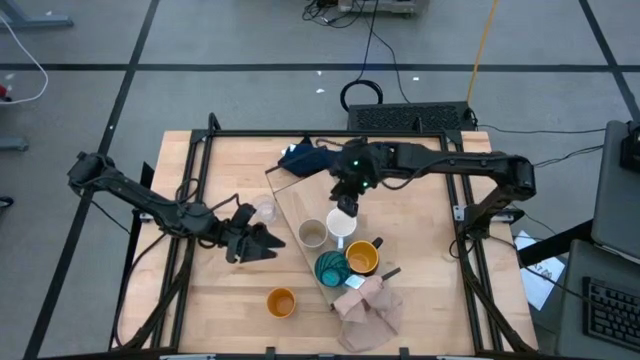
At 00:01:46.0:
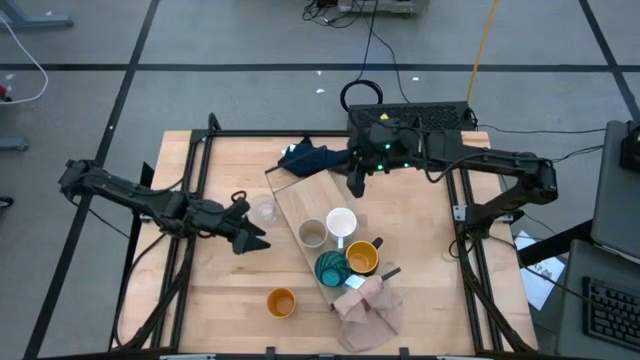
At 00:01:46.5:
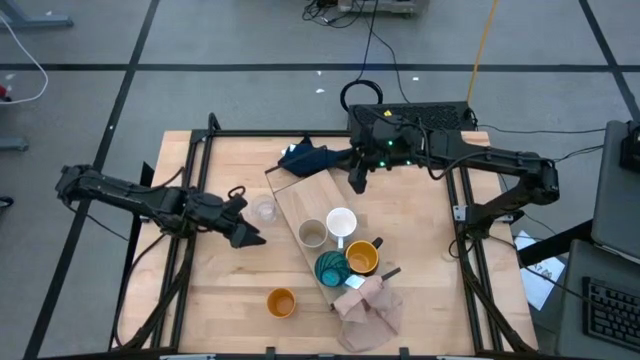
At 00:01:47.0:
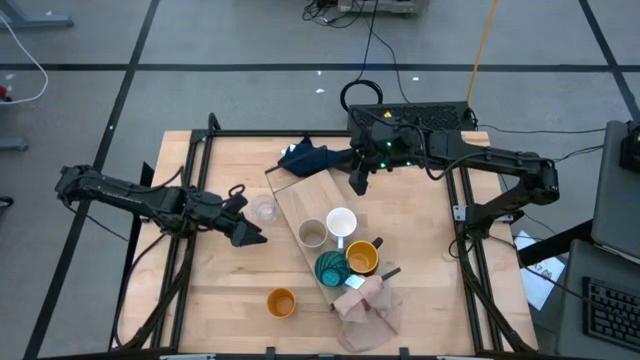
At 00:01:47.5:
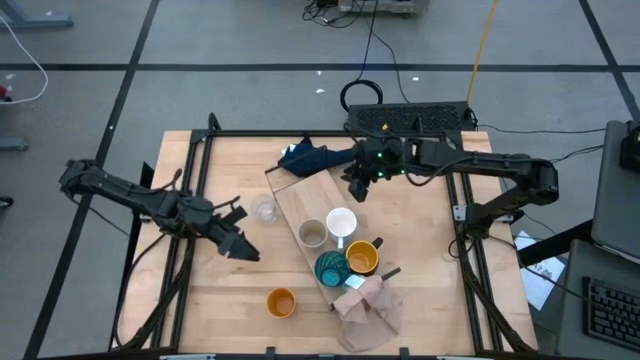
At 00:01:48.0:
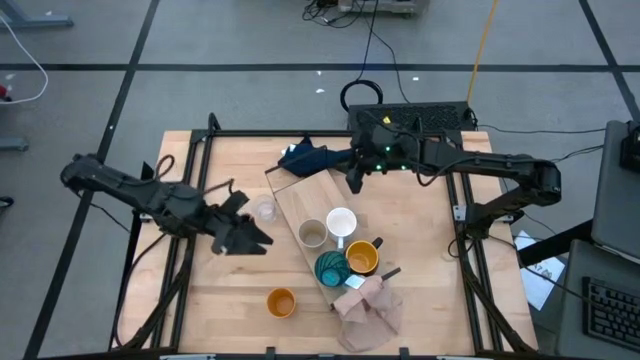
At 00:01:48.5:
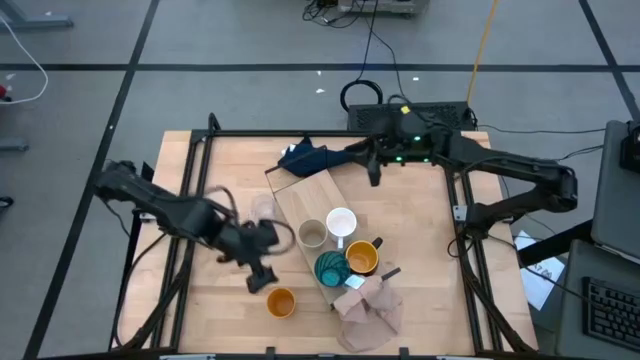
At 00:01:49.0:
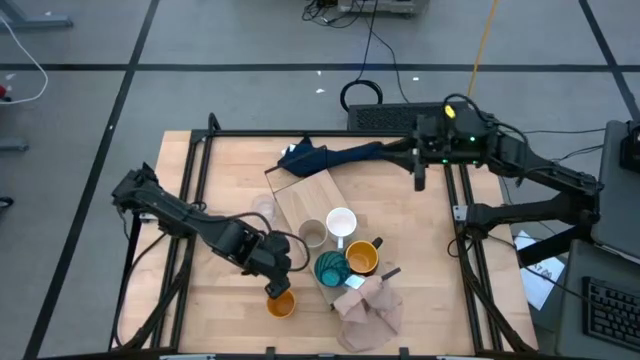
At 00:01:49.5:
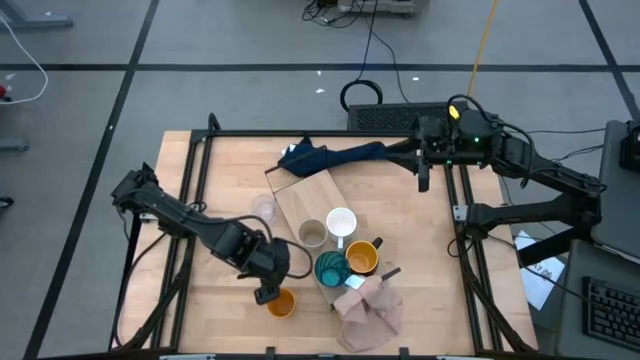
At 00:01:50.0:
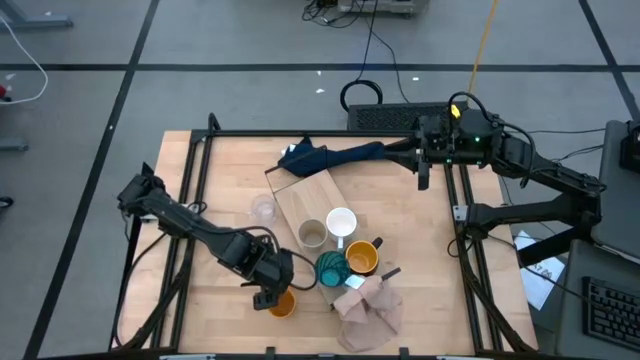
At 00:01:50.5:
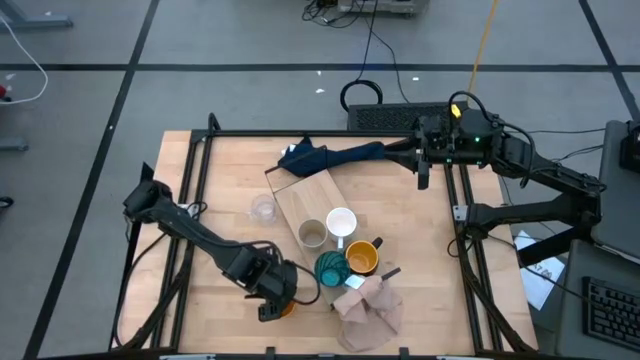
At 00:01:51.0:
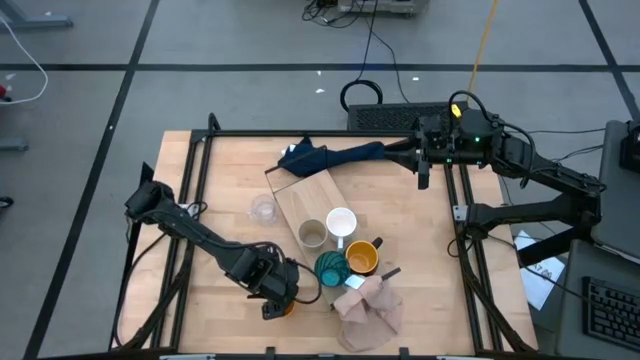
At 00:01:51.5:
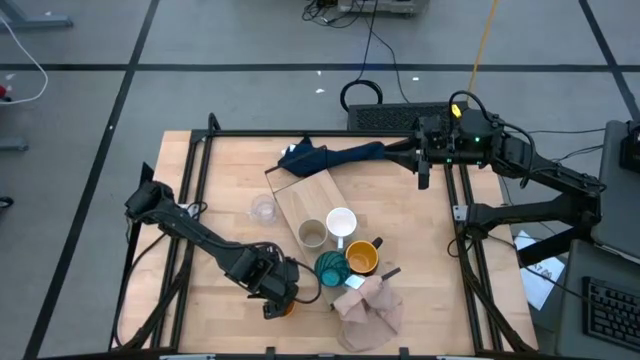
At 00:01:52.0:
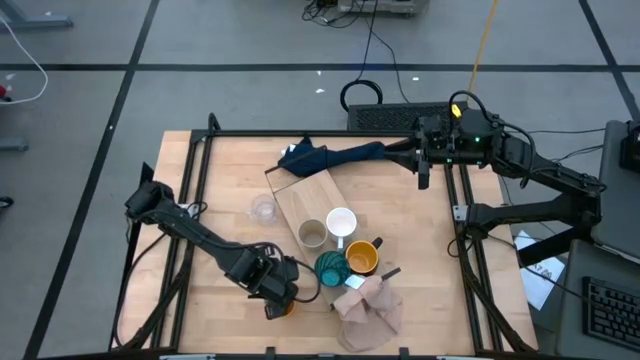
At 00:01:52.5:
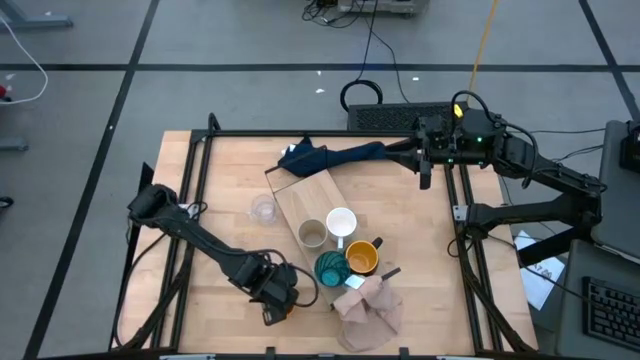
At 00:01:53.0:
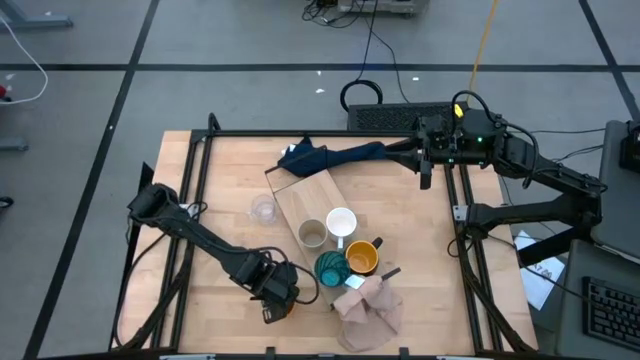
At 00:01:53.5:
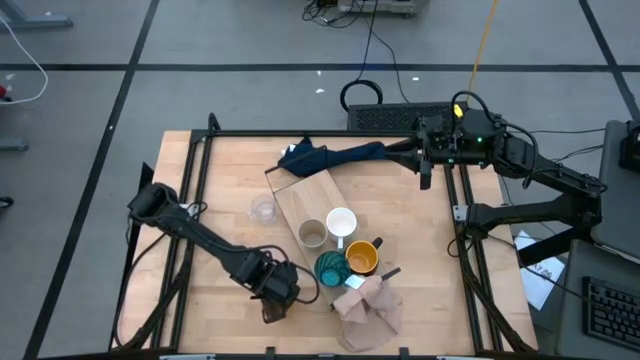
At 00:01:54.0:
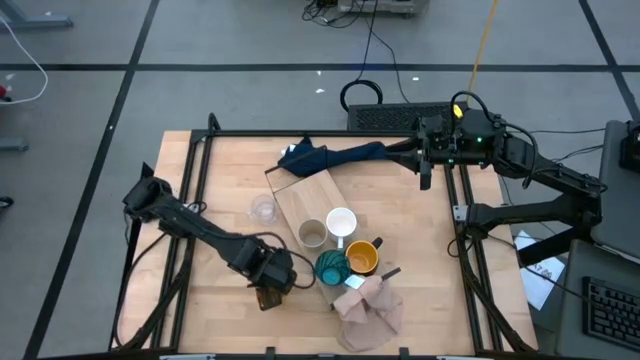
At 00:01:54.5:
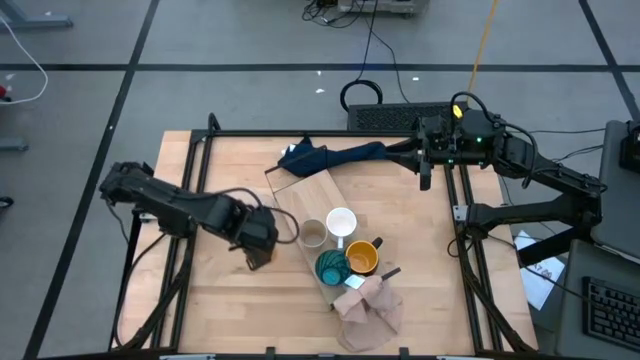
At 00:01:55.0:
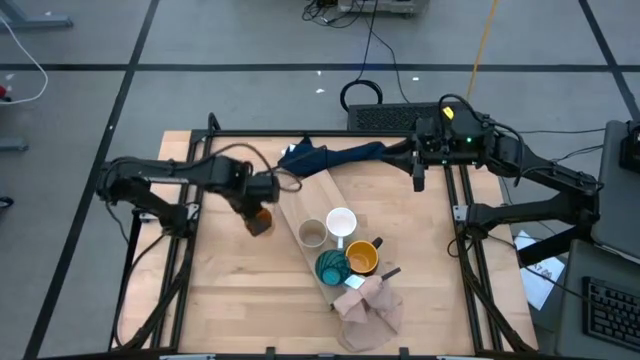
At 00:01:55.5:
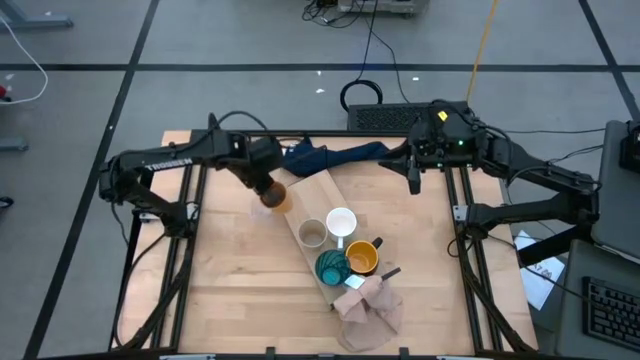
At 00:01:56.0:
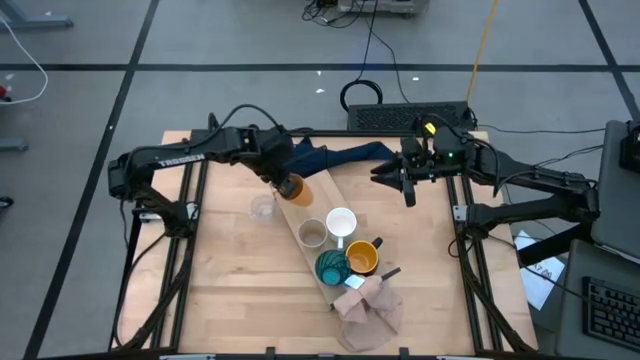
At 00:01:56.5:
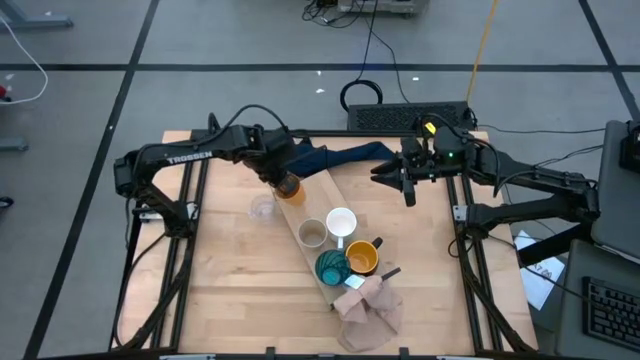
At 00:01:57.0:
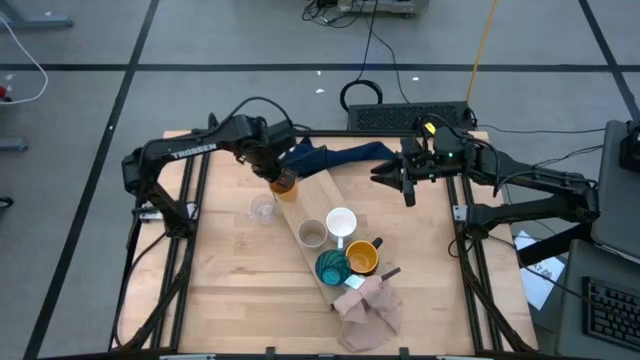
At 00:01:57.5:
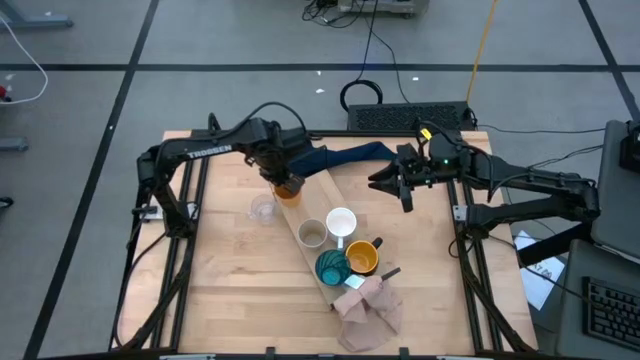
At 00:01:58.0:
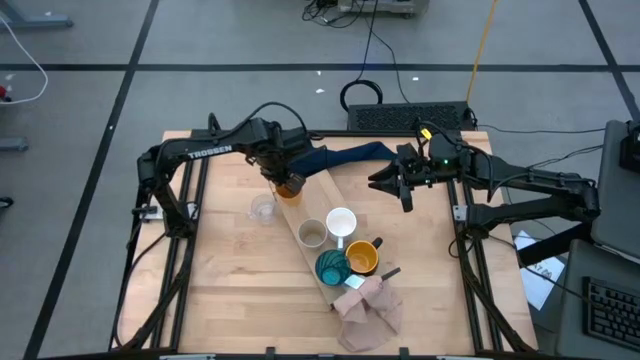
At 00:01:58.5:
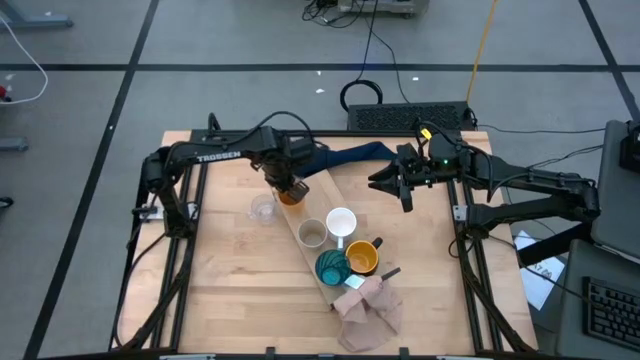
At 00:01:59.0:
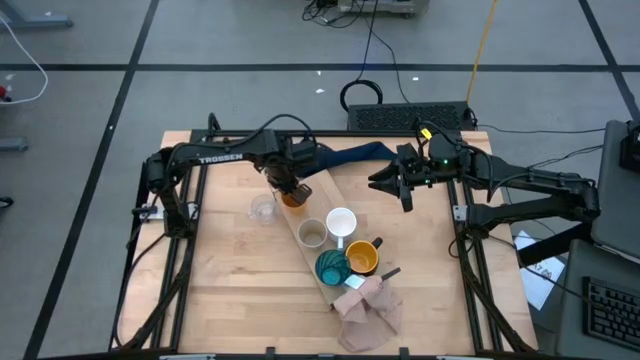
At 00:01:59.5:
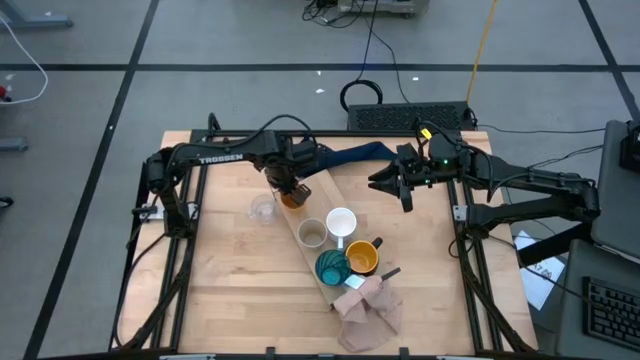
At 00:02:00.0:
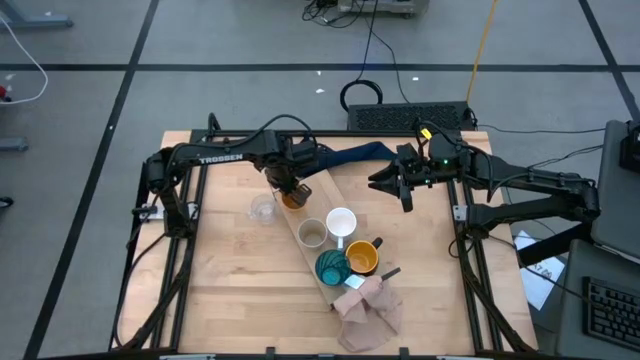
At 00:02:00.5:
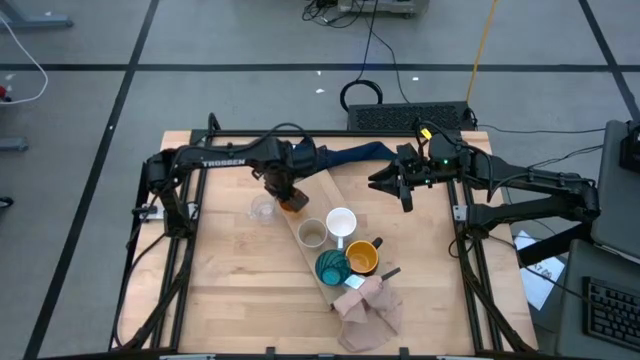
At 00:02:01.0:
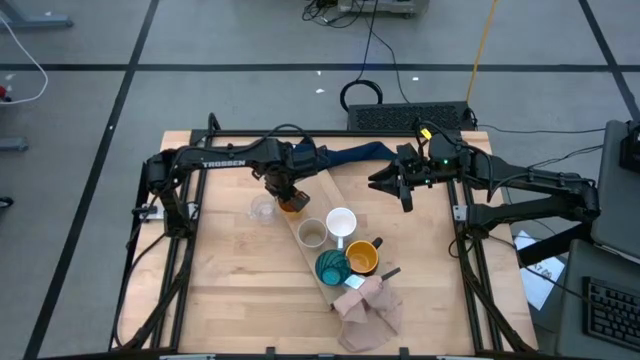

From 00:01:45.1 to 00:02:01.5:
Task: Stack small to large cups/mugs on shelf
Put the yellow cup on the shelf
